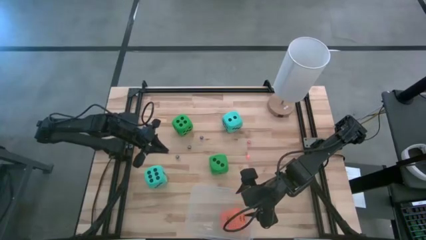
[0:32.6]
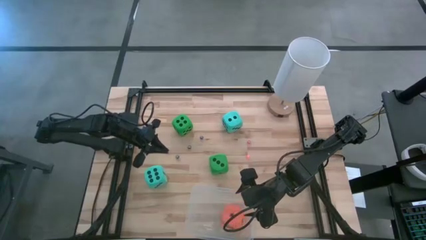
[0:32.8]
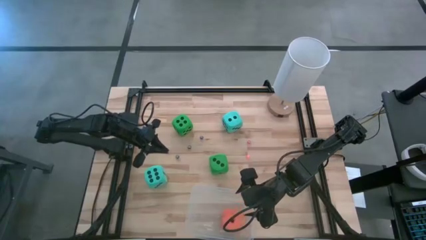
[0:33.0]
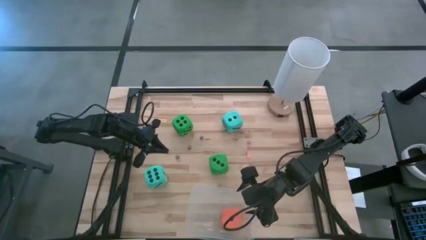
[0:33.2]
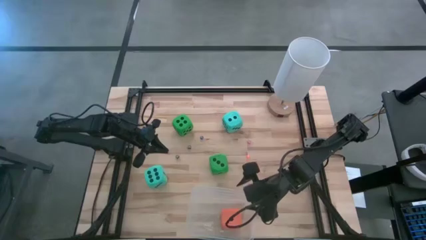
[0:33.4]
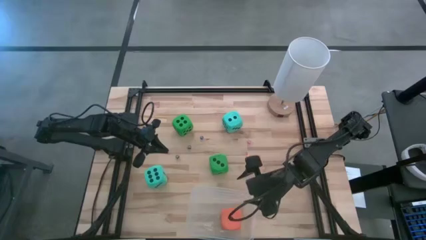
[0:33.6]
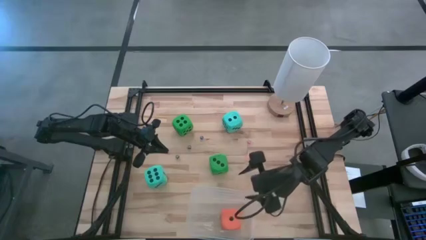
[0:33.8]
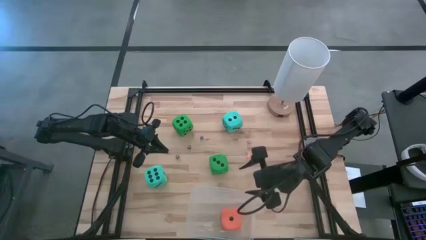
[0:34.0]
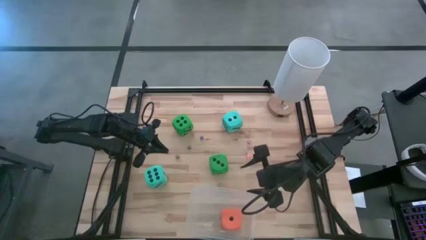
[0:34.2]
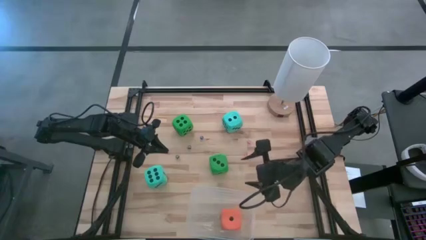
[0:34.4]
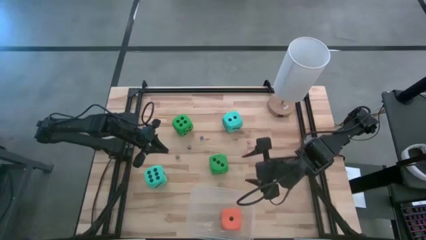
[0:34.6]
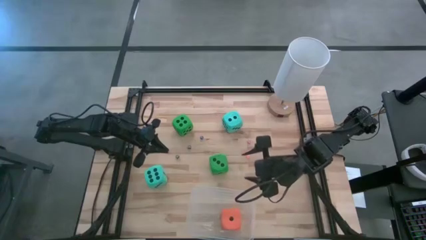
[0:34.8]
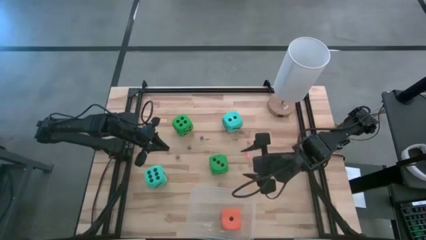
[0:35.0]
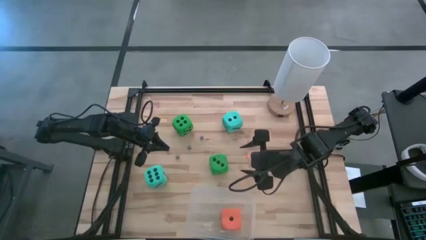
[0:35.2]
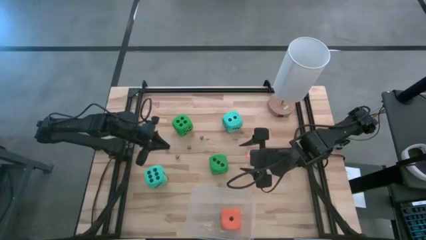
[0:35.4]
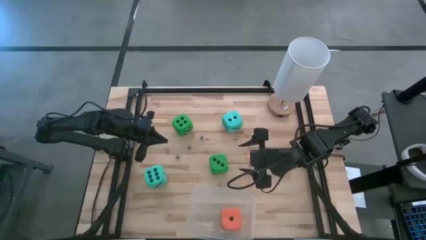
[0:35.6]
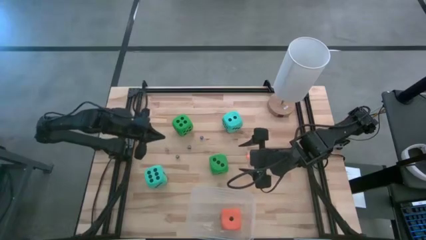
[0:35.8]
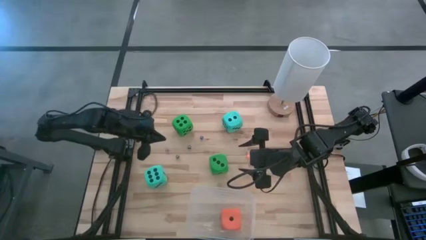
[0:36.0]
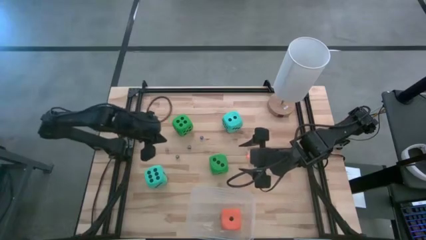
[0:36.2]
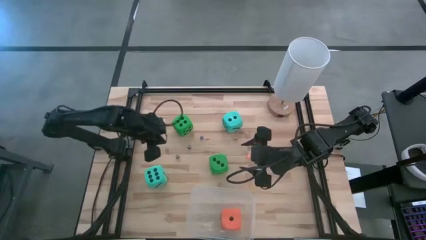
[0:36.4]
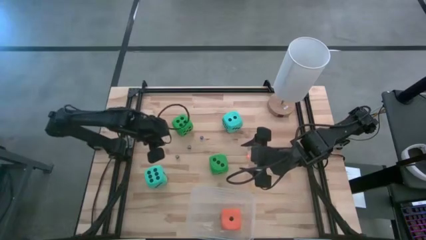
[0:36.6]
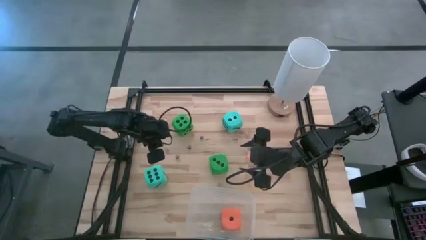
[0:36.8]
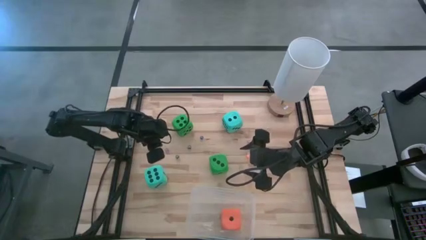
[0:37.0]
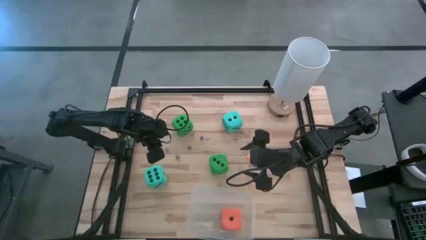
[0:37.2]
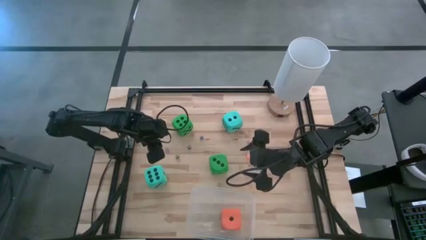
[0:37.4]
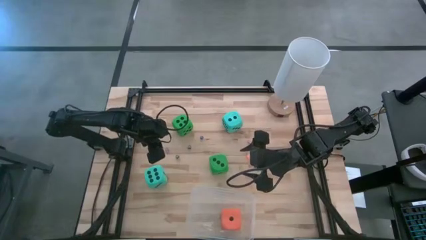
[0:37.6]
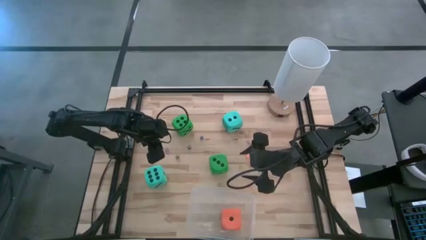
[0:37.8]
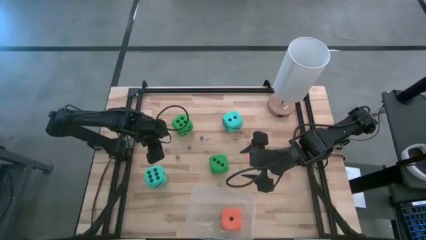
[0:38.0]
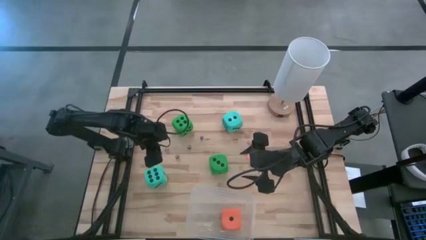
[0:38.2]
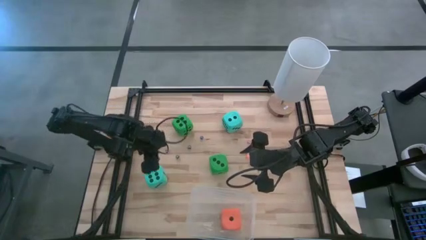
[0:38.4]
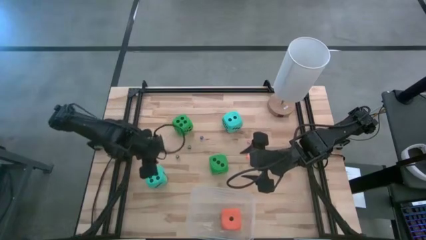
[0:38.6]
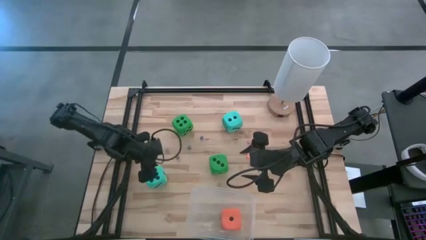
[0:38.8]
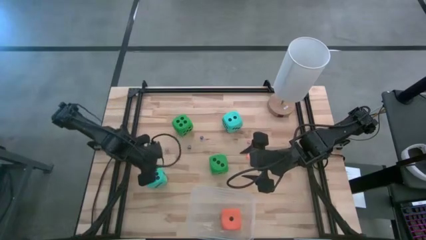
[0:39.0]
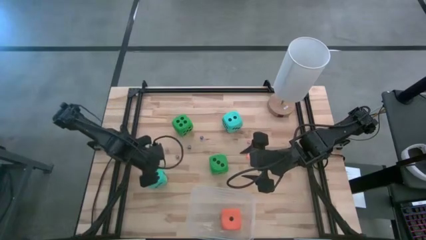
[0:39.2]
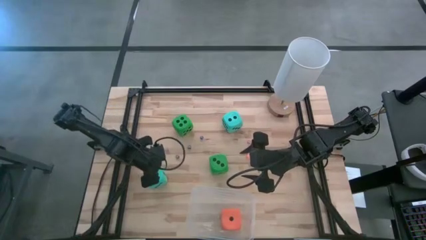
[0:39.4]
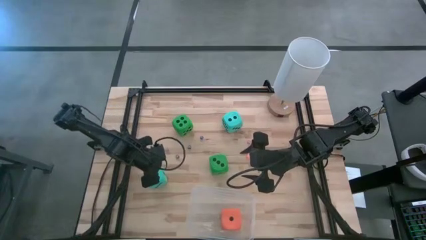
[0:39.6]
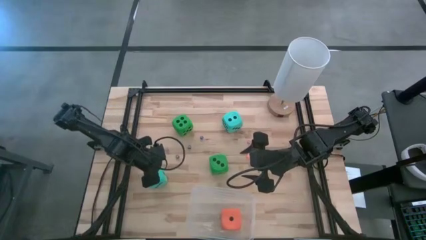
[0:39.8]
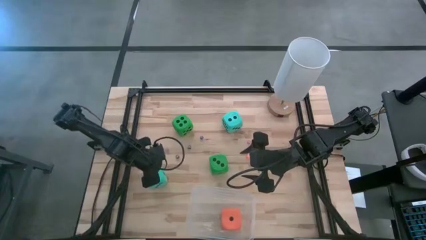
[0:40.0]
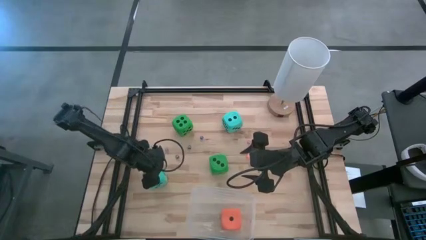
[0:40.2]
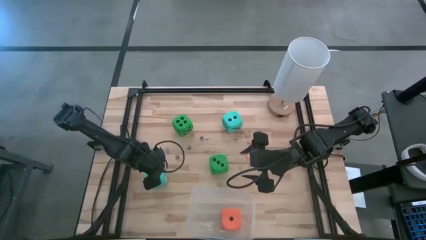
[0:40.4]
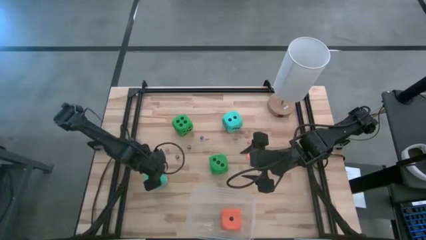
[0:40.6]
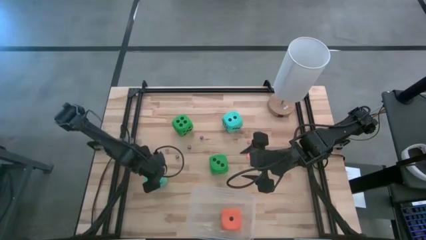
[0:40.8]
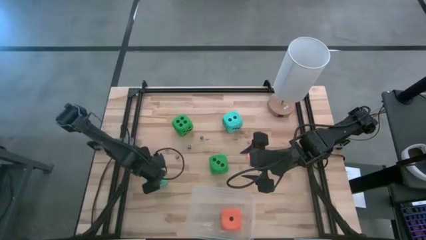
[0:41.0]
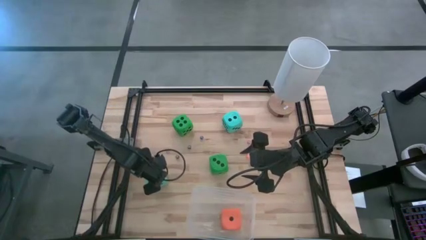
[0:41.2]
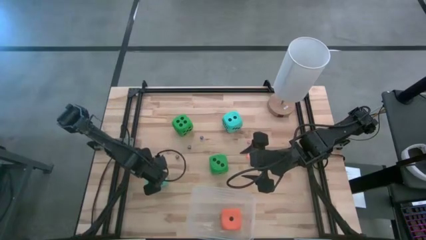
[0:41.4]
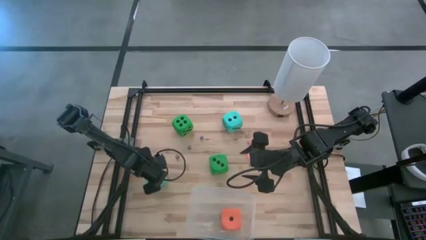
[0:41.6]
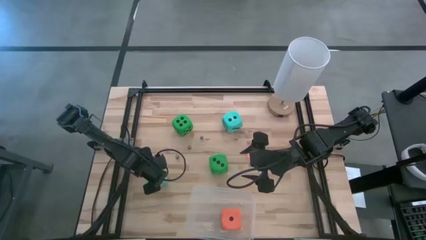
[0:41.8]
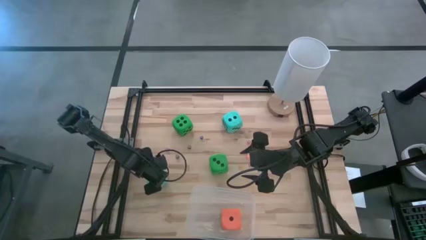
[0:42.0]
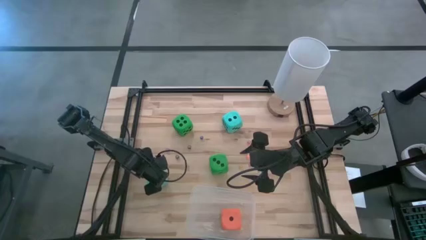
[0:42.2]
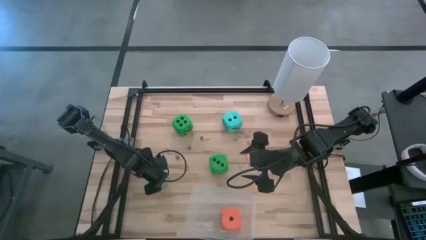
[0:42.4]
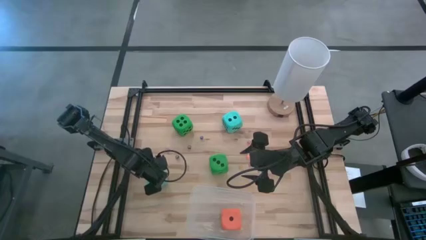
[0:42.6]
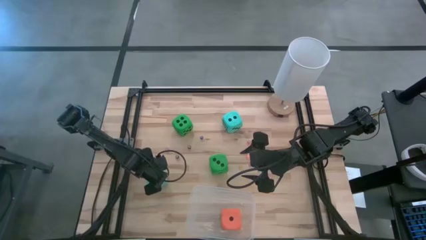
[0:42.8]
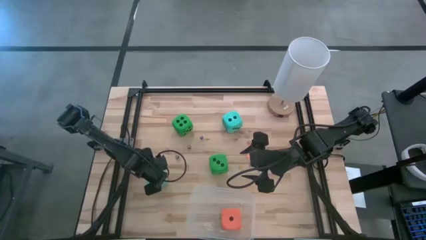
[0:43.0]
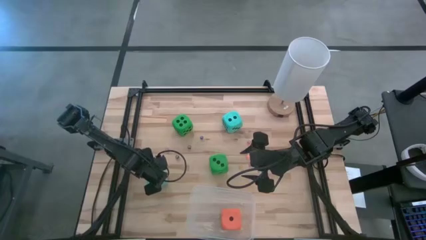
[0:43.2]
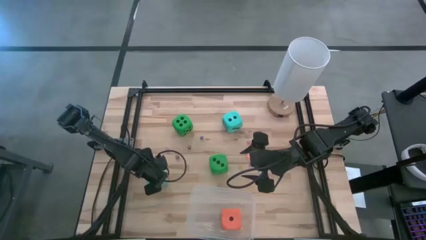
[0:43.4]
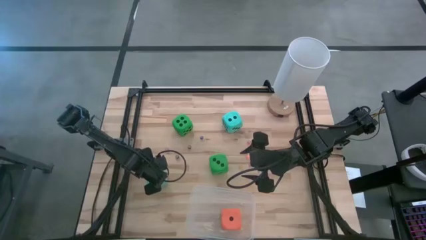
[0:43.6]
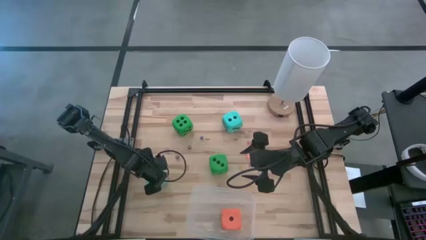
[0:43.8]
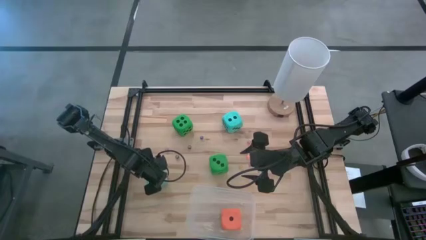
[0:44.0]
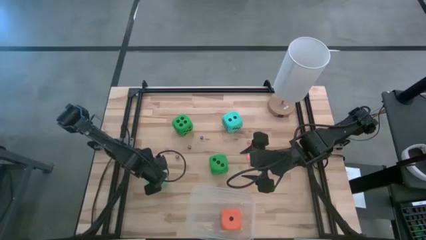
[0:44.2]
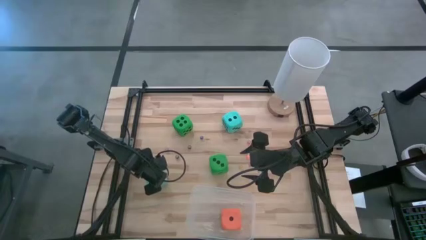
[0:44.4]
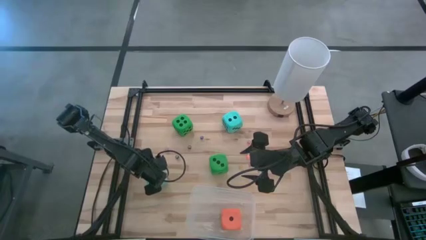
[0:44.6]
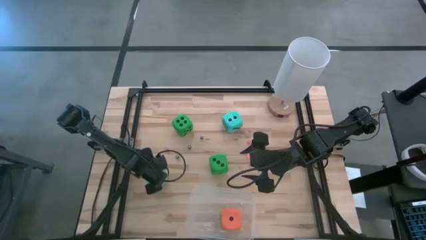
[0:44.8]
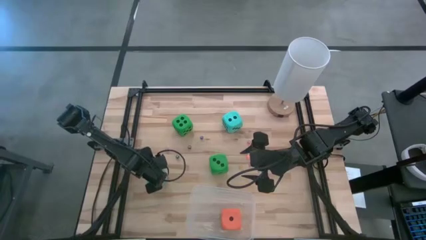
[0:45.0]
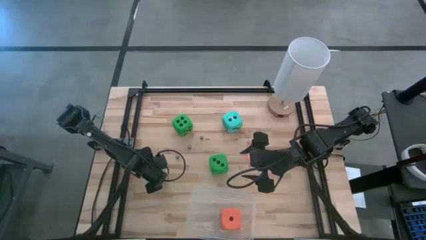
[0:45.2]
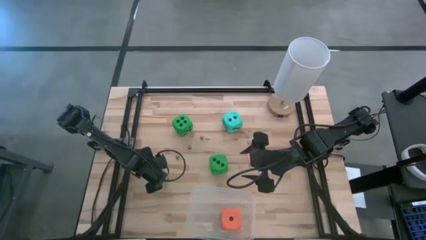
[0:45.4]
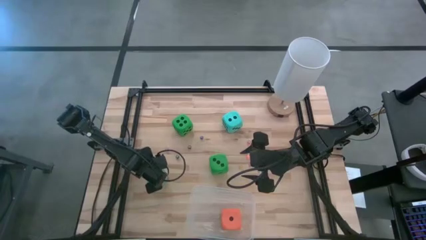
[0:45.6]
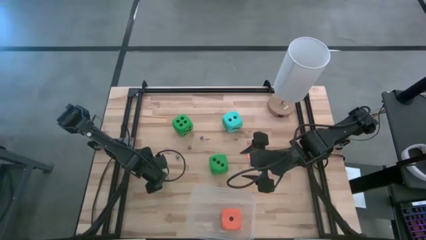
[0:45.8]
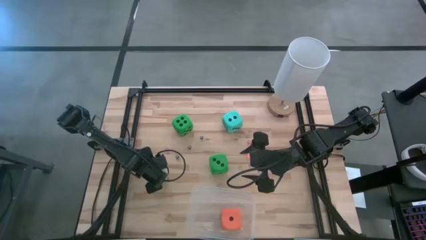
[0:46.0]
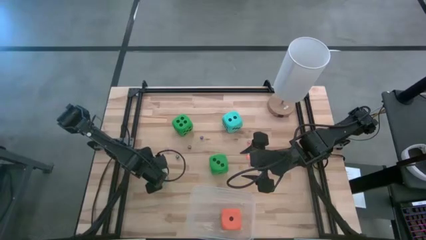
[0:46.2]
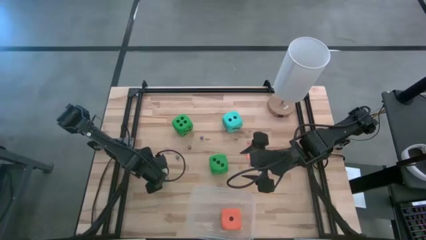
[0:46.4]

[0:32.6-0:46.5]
Task: Pick & Place Dice
Put the bottom large blue dice into the transparent bin

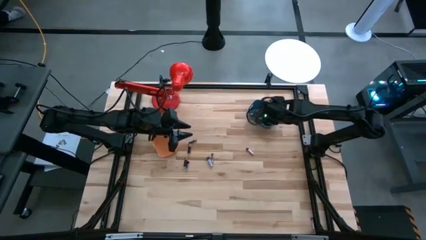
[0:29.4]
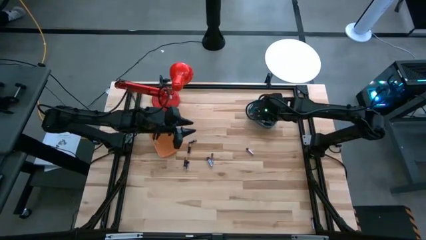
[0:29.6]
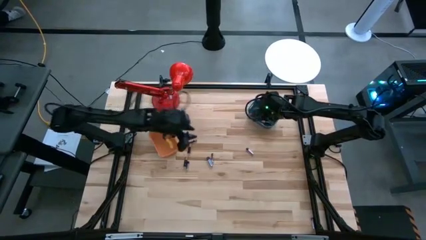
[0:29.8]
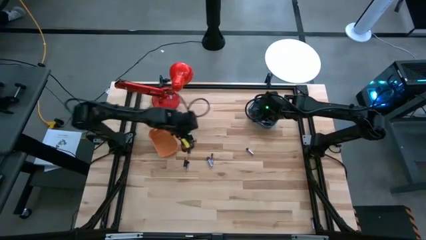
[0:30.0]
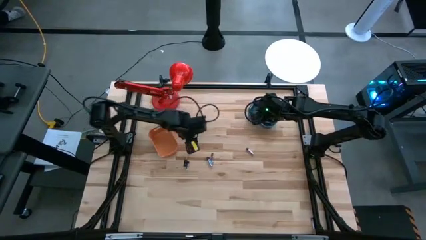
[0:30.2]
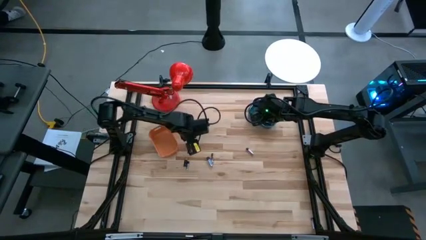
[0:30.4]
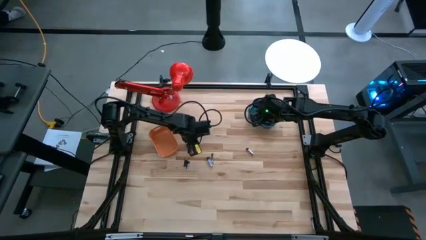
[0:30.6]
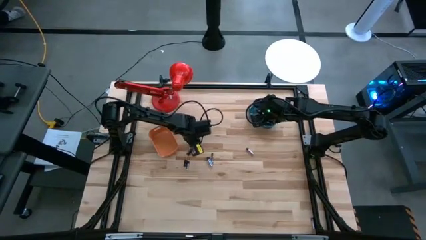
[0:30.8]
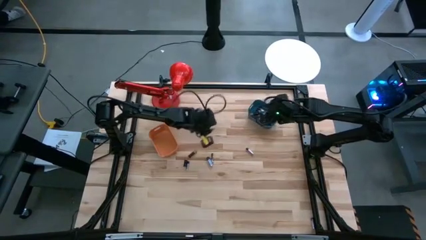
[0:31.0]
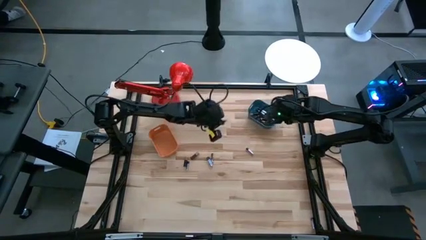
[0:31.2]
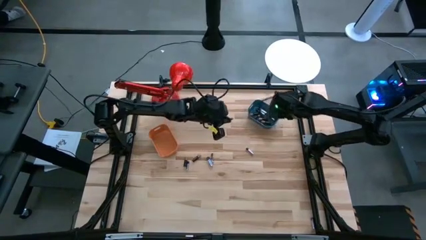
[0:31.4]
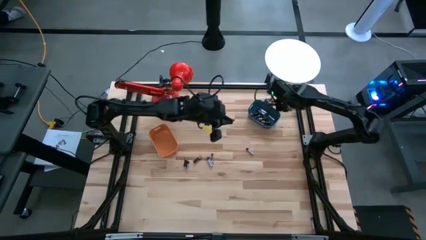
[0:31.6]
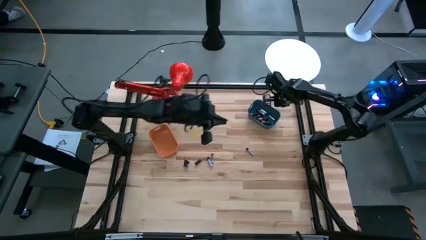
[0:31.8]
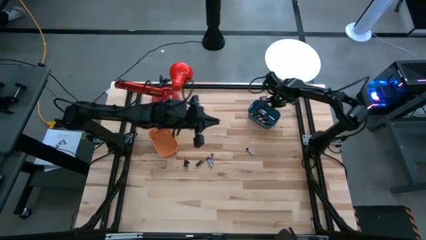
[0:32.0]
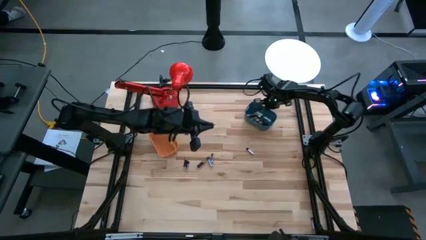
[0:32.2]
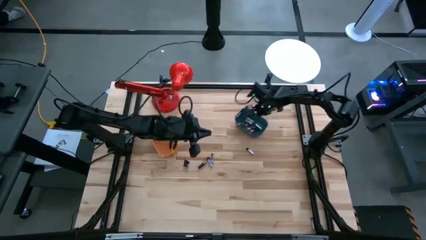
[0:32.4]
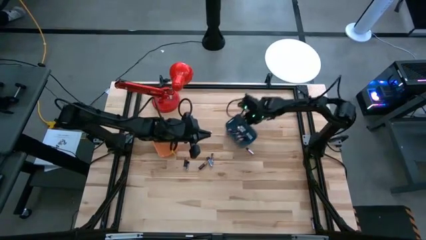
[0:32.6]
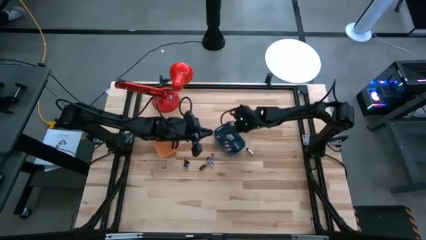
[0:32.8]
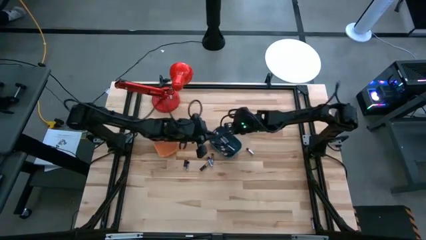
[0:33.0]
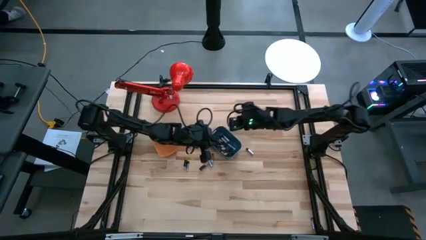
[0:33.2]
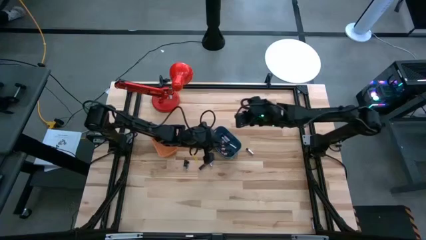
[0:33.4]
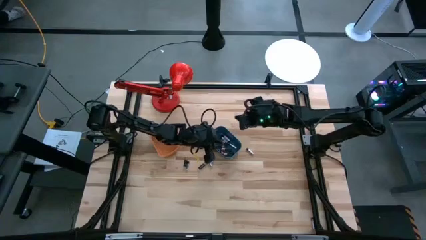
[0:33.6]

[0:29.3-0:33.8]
Task: Sort batteries
Put the black battery into the blue bin
